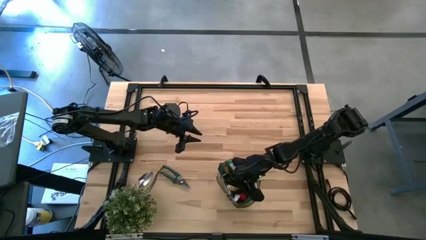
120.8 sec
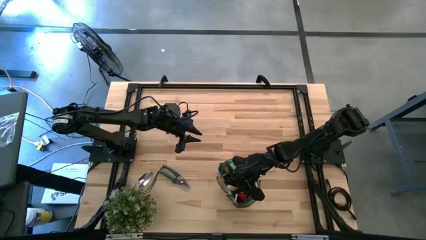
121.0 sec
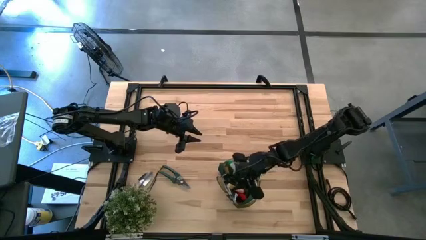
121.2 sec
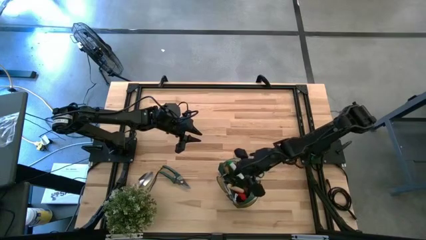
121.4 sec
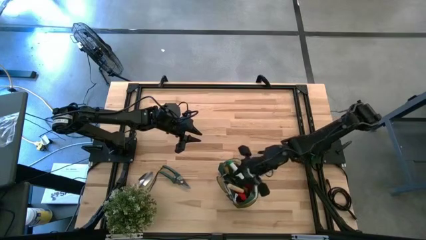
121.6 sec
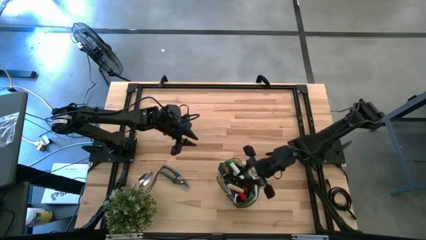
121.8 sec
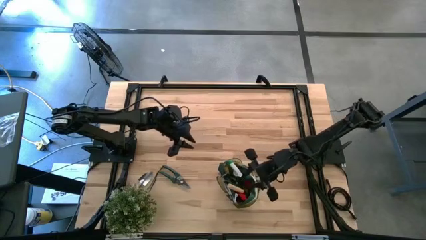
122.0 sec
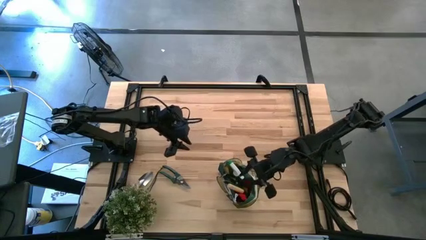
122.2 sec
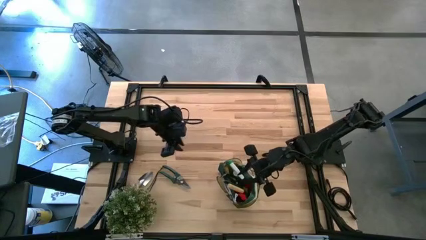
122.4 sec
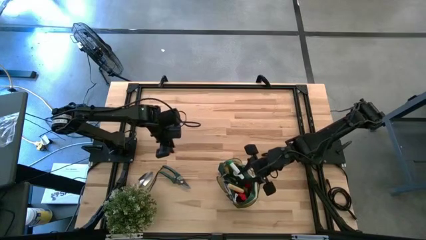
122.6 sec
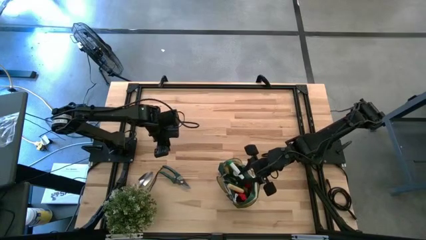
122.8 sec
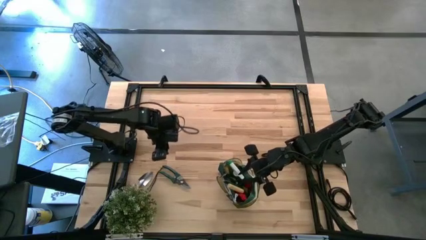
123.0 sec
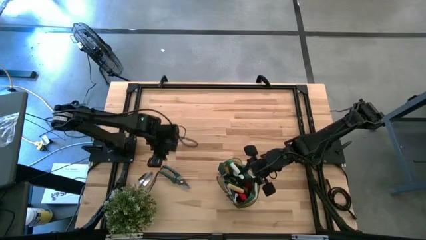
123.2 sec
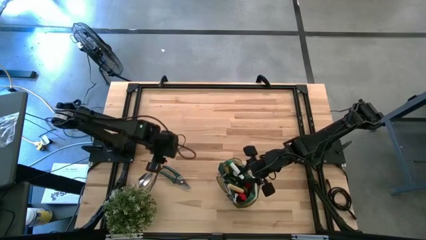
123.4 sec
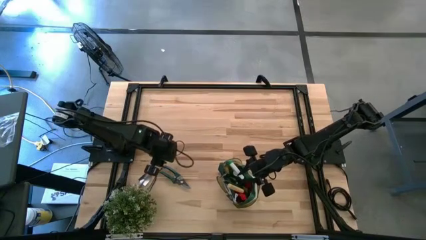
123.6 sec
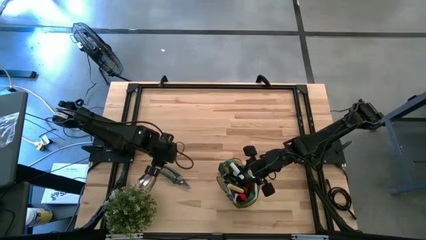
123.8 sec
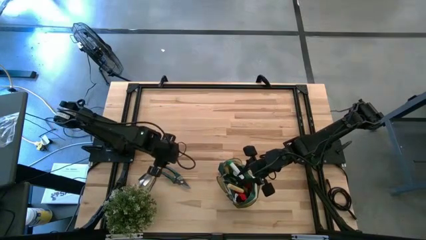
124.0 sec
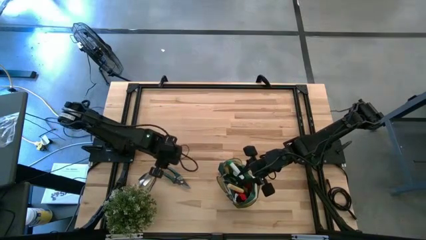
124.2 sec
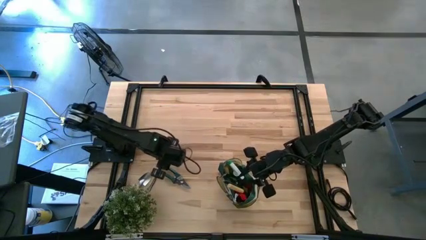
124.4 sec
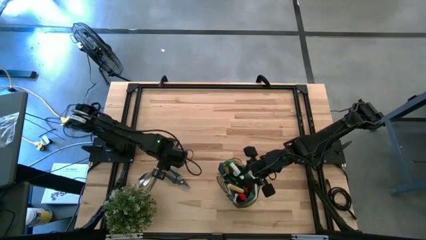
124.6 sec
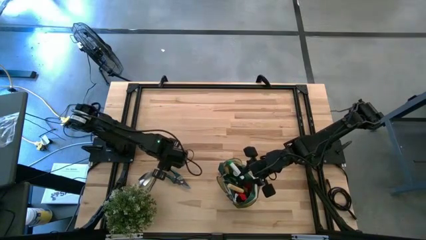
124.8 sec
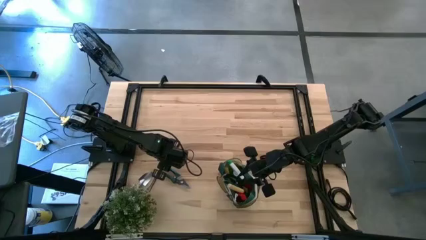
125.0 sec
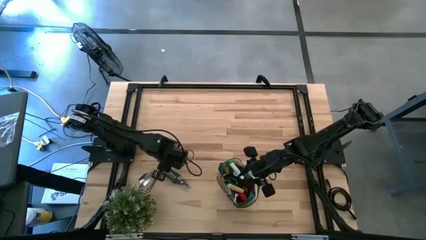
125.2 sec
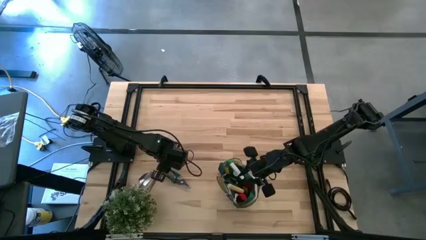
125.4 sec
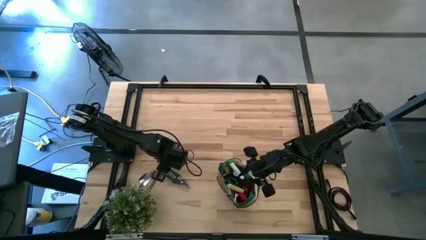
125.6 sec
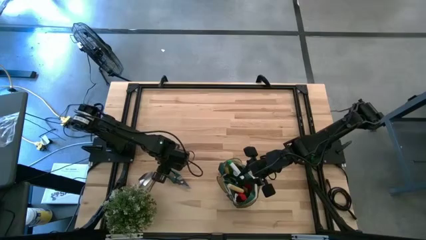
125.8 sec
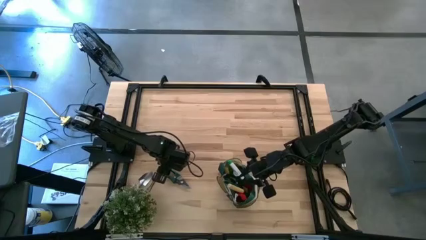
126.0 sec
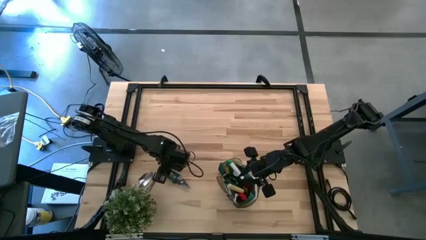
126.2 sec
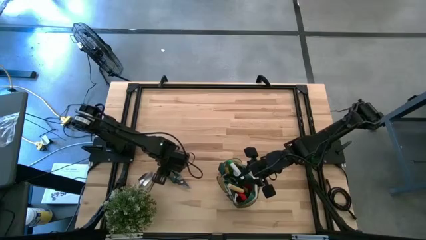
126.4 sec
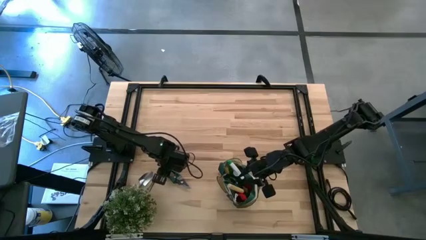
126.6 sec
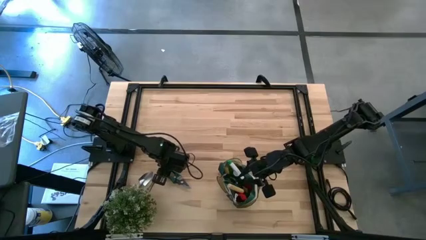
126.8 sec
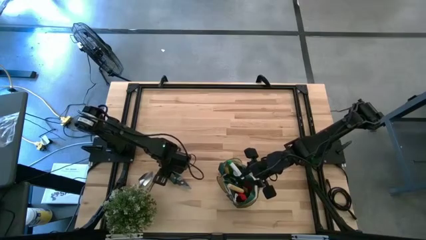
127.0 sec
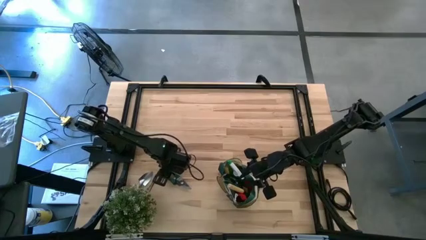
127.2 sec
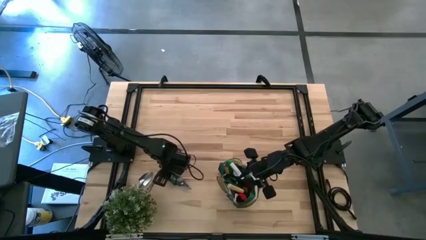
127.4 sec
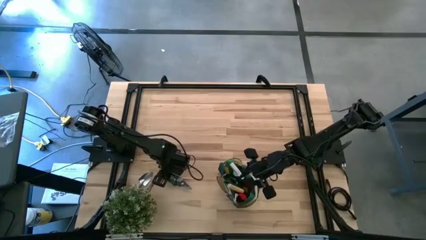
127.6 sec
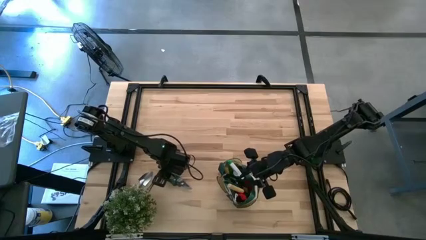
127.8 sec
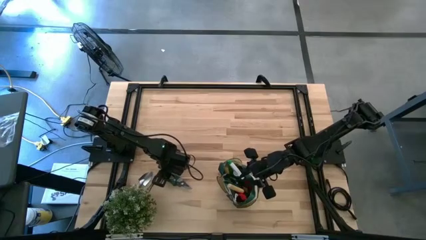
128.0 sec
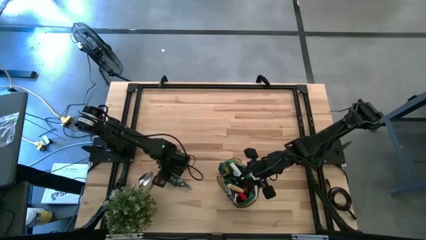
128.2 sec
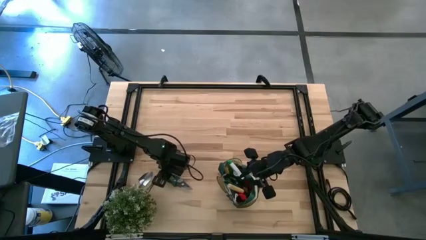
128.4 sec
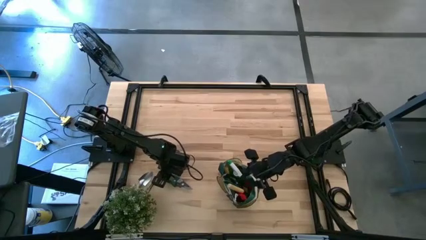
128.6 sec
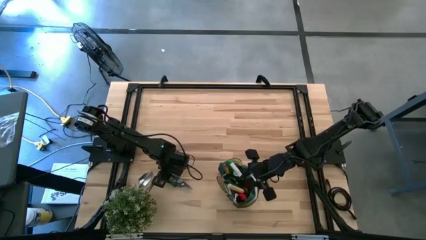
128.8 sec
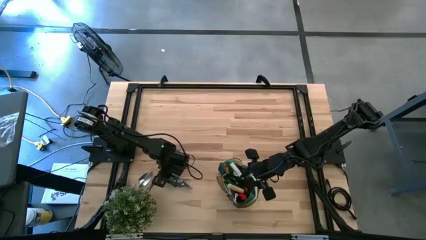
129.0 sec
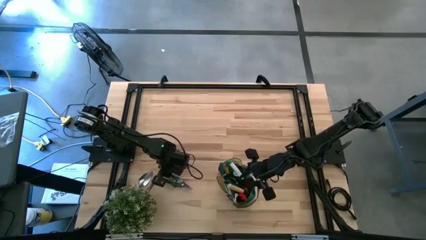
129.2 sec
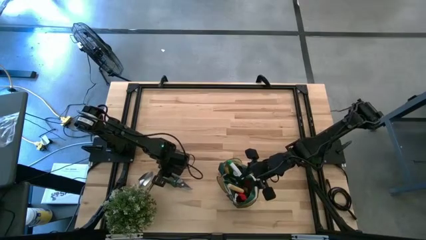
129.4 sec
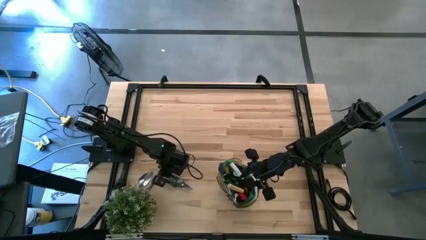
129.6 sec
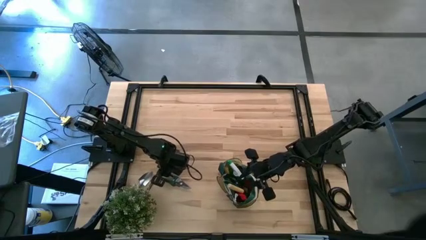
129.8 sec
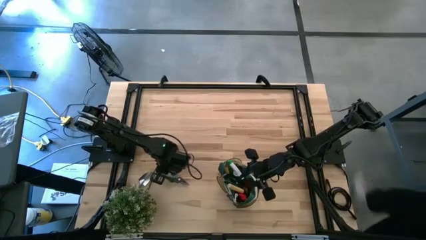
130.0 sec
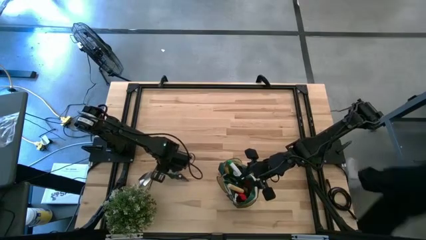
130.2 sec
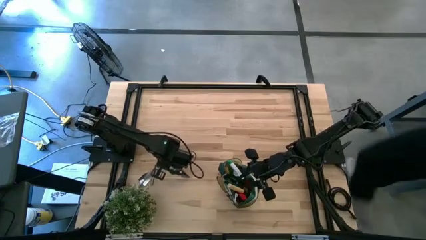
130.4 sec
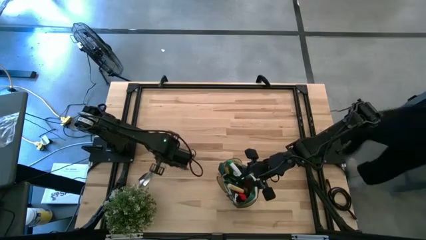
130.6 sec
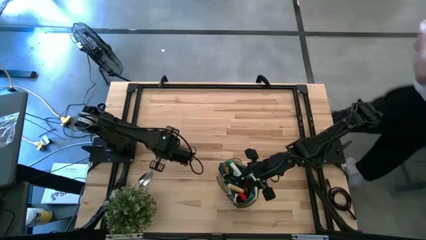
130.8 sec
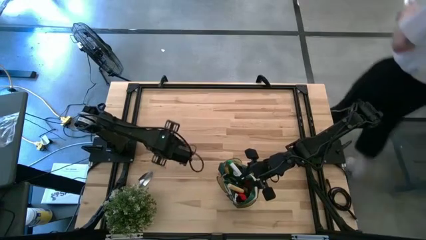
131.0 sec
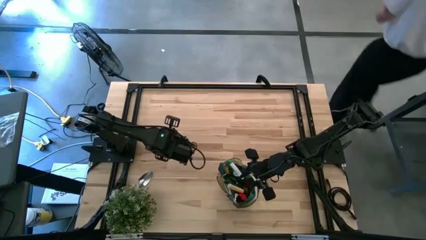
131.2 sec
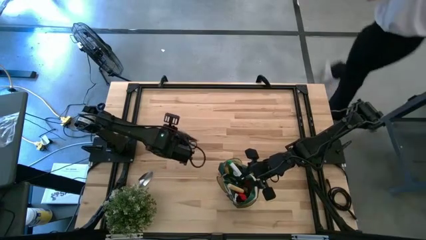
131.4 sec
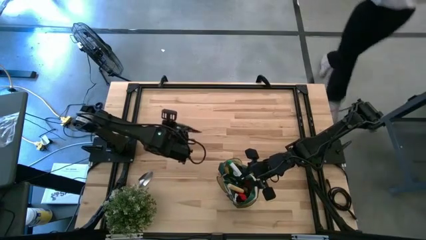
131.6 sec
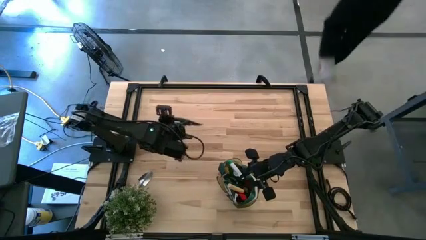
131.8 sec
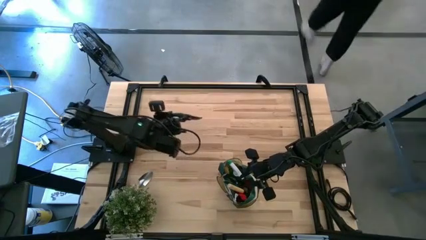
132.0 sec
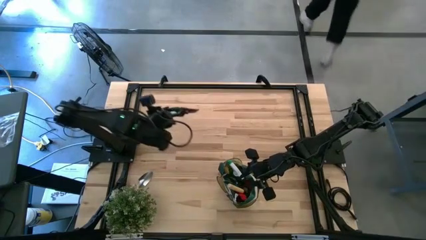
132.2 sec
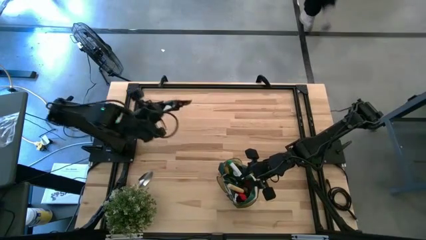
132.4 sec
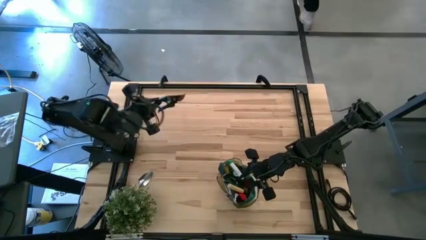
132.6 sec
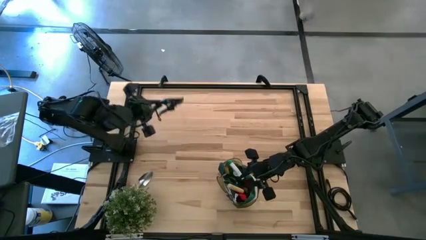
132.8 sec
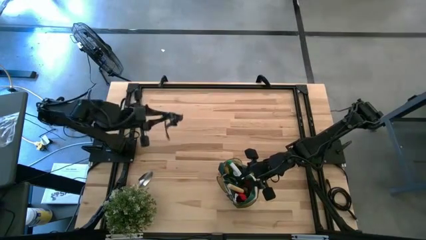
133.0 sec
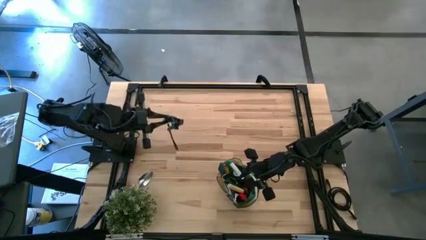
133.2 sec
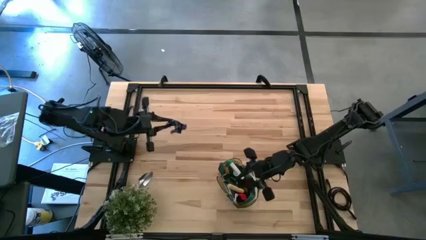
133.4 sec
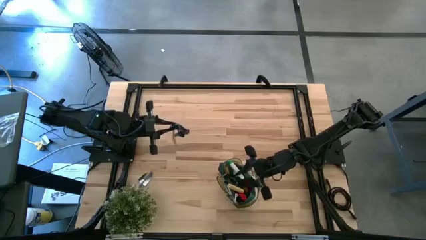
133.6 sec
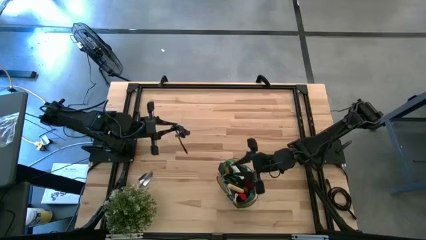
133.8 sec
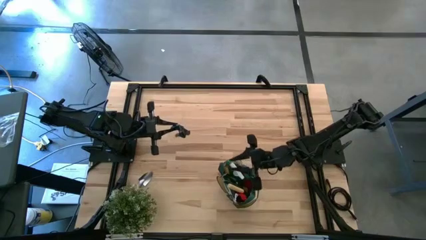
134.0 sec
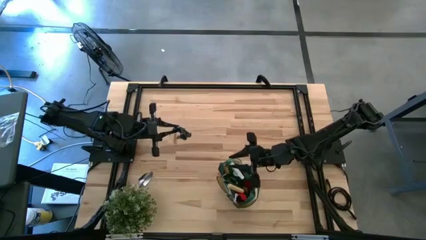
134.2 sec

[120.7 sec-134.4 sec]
Task: Pick & Place Garden tools in Gardening bag
Put the green shear scissors into the green gardening bag

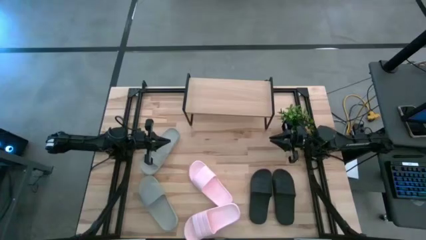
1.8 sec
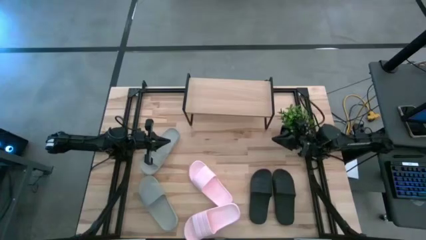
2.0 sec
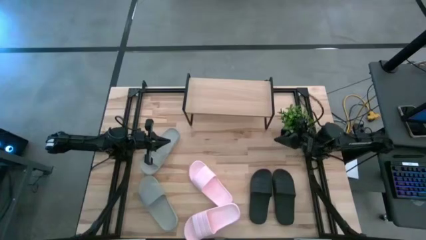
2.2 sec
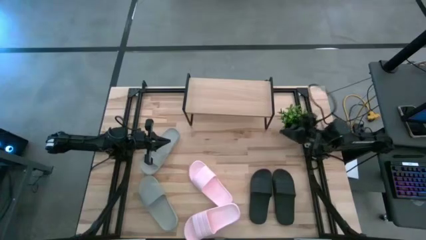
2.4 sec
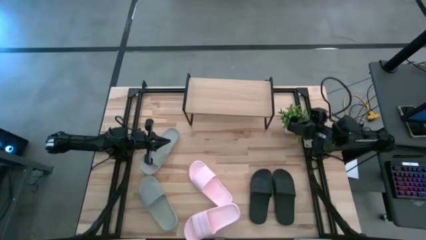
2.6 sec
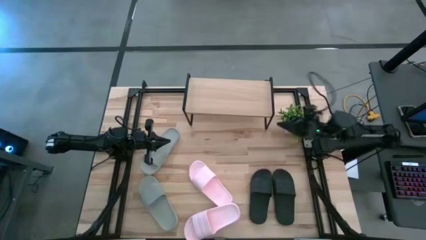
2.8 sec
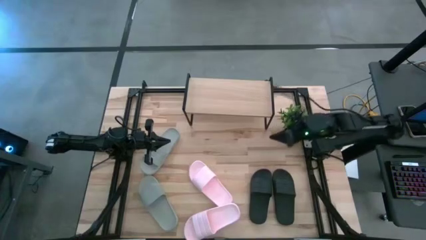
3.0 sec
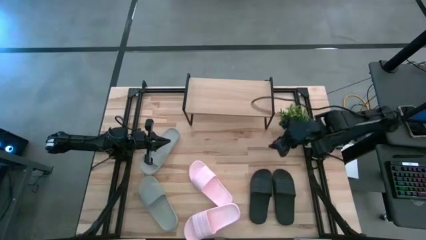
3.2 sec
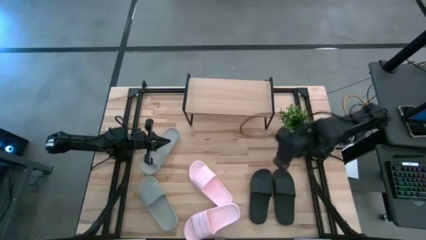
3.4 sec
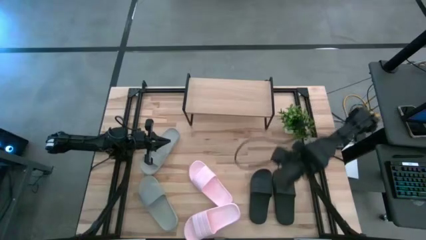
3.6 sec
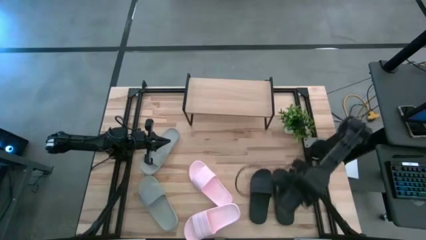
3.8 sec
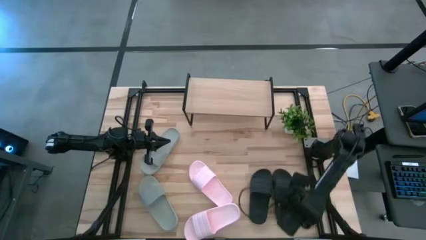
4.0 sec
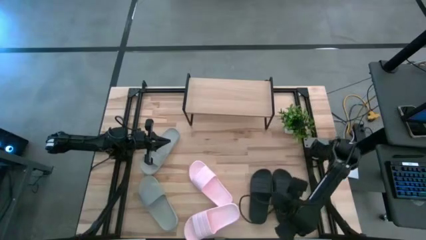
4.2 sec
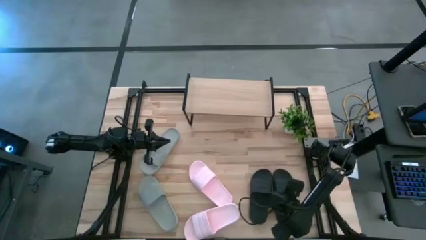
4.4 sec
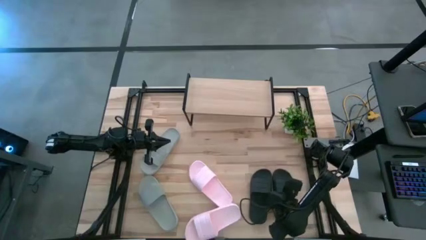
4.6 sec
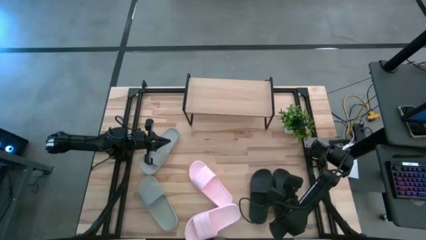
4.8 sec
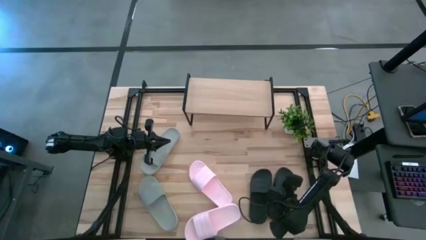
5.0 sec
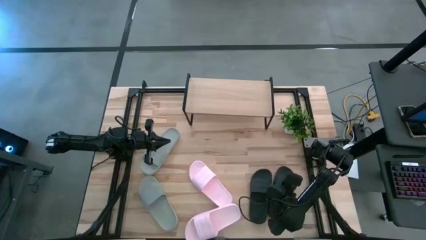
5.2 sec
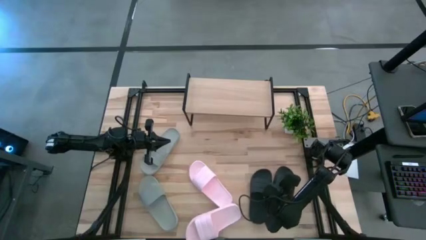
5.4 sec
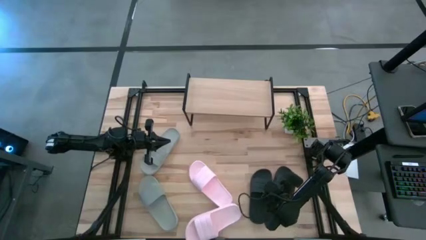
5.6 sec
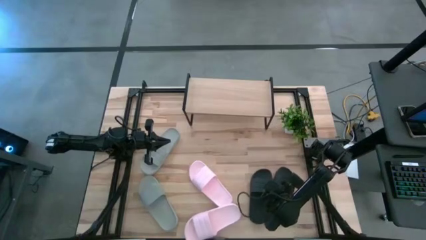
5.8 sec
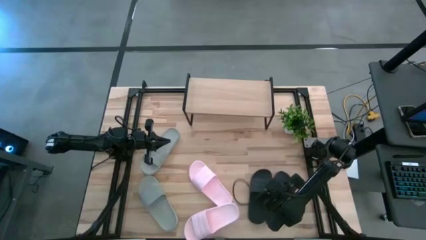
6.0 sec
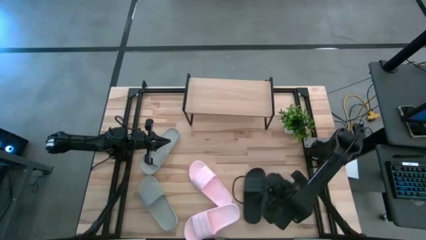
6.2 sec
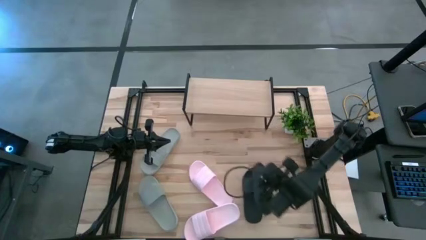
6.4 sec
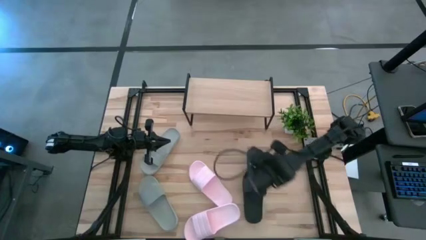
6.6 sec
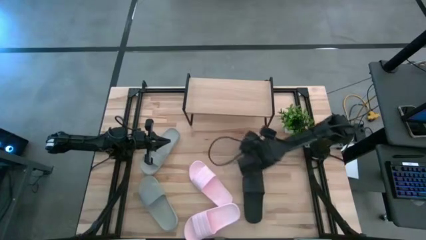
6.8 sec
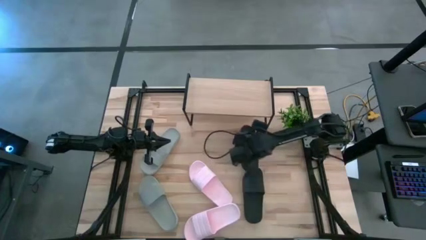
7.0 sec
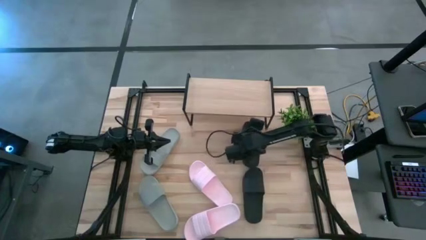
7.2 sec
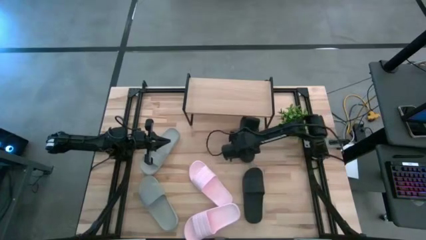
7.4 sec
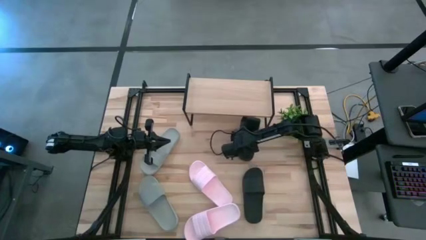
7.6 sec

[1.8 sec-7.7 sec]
Task: Pick and place slides into the shelf
Put the right black slide under the shelf
